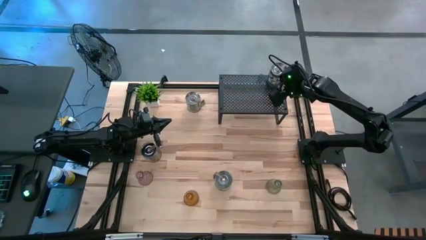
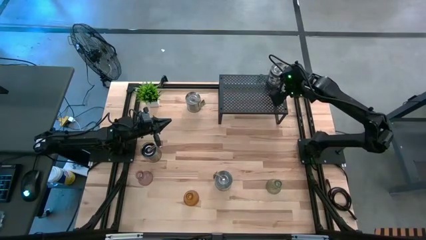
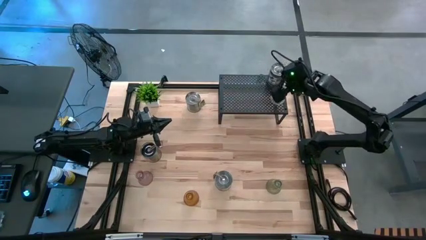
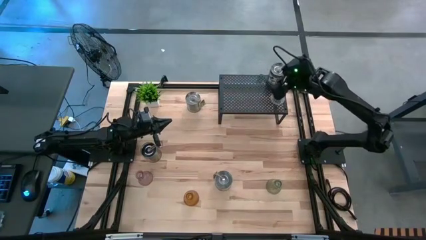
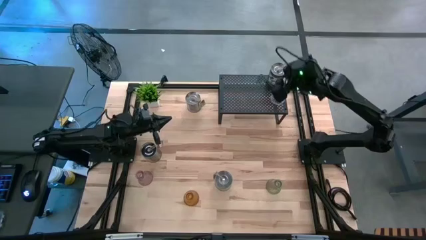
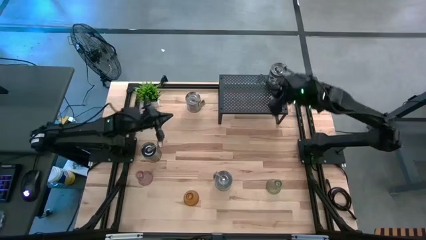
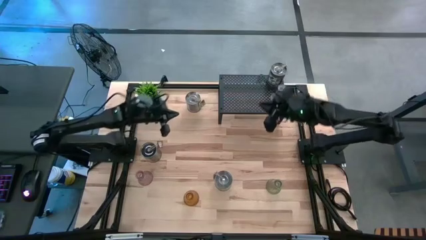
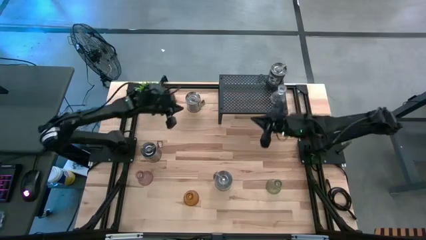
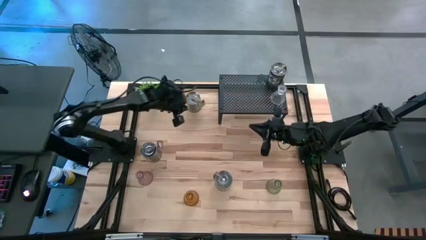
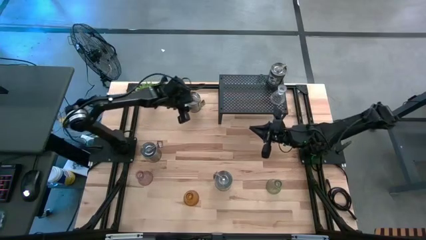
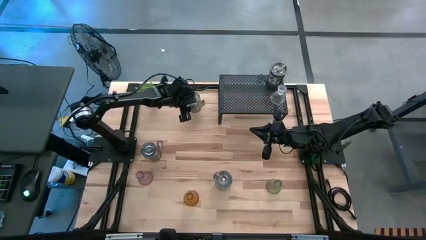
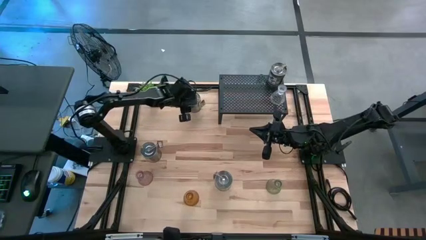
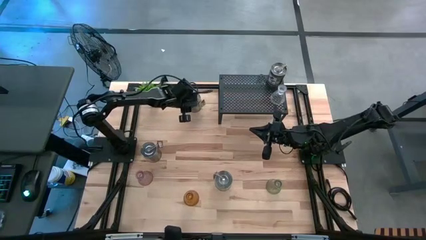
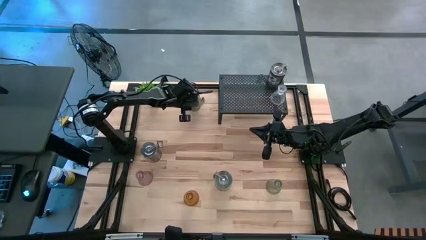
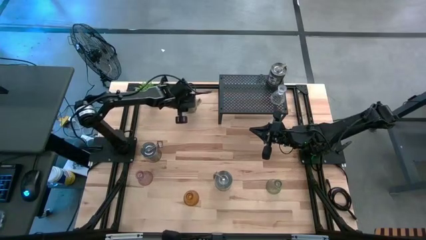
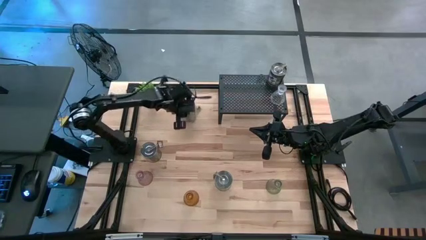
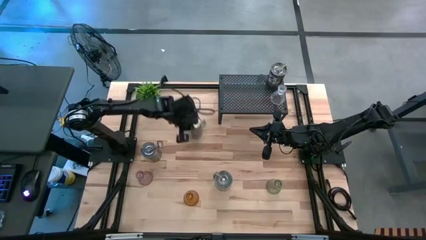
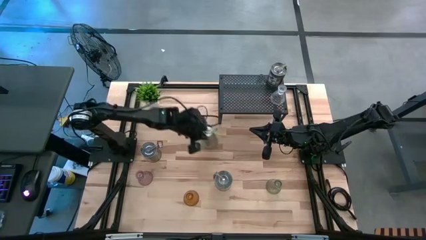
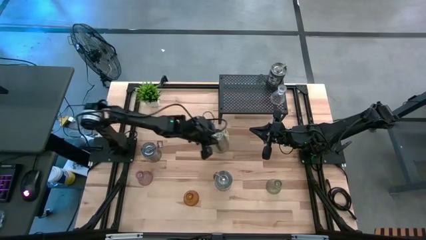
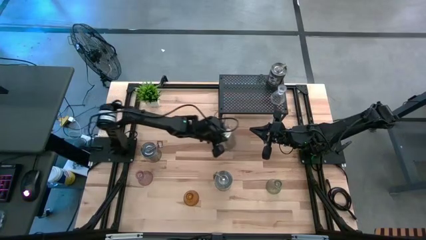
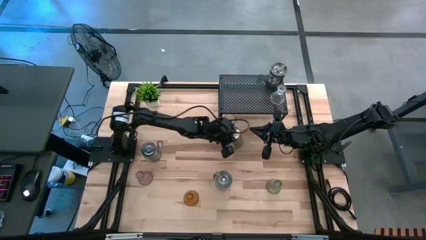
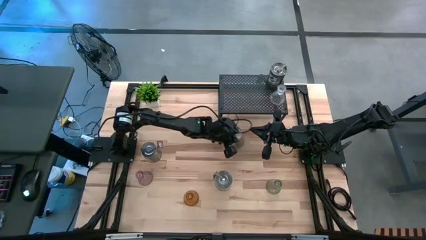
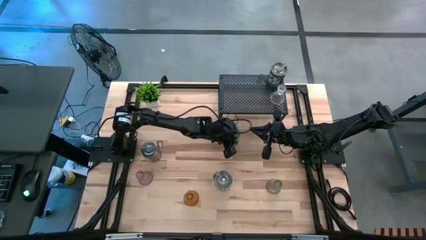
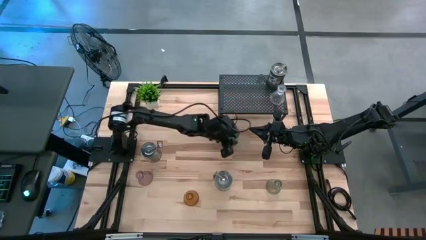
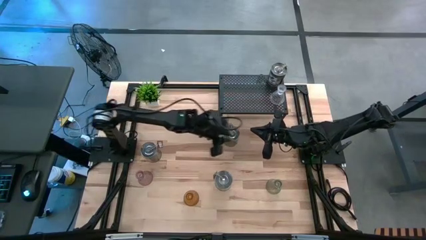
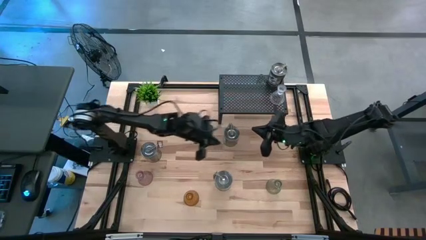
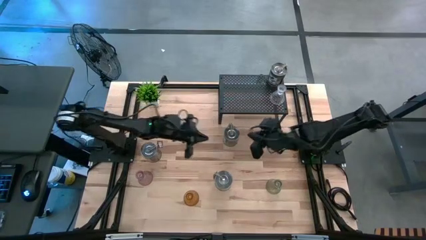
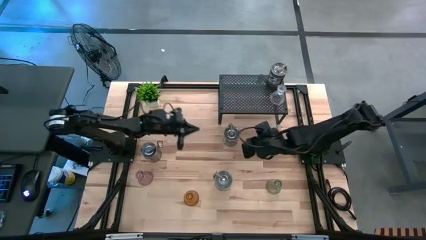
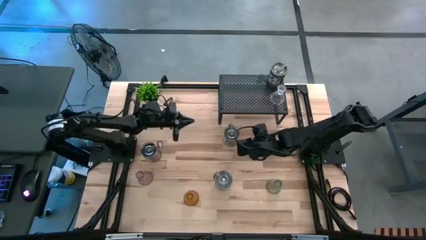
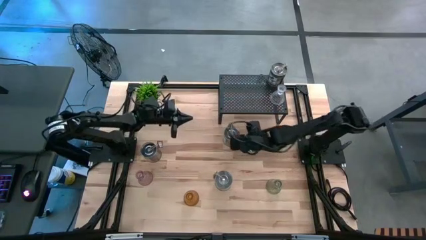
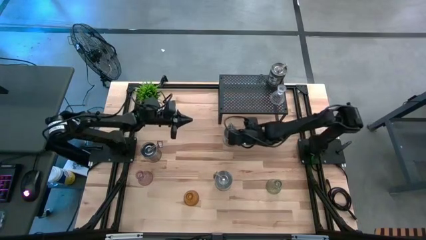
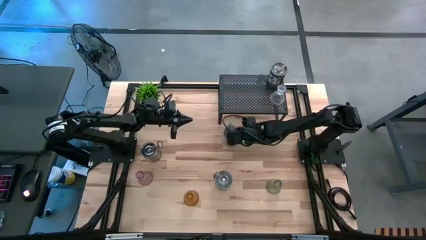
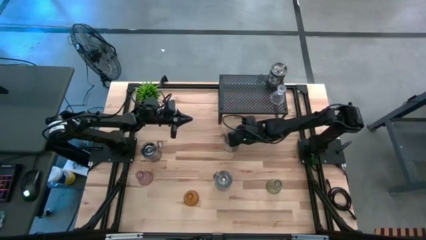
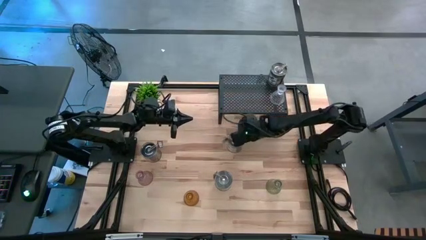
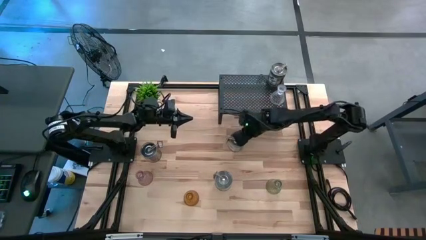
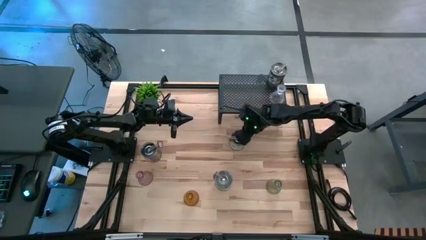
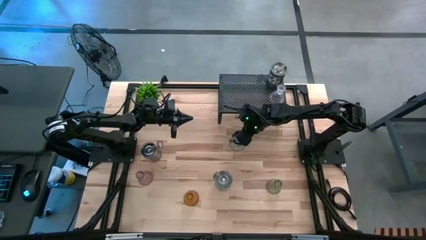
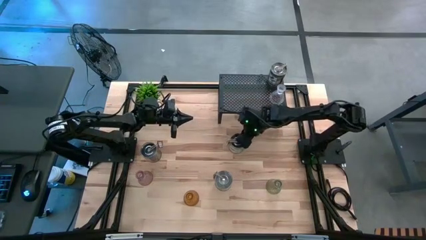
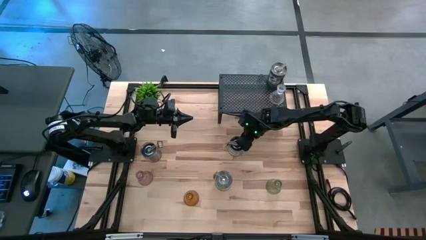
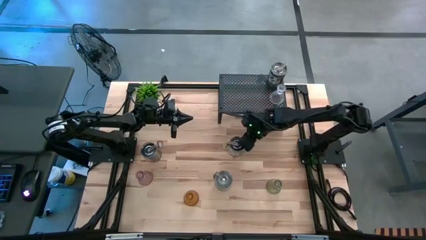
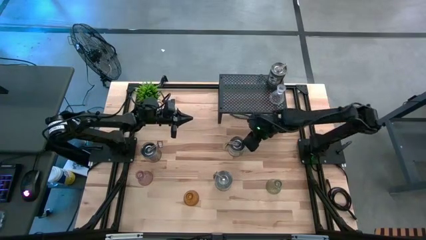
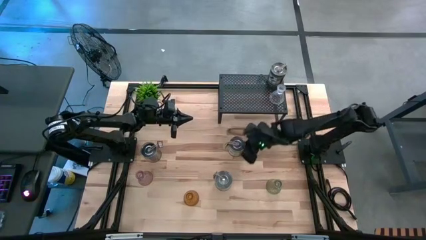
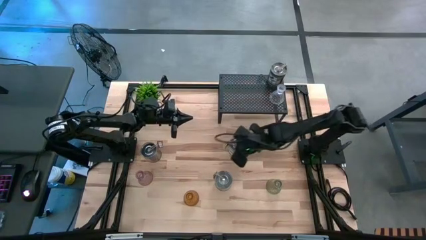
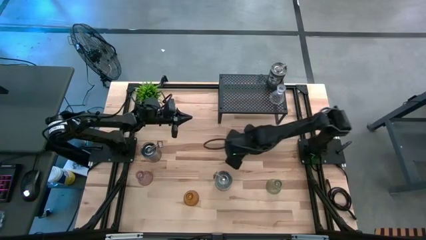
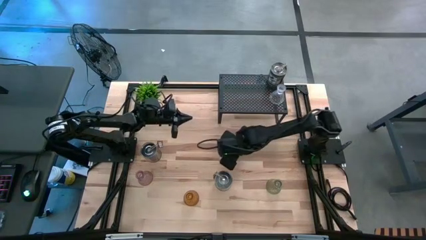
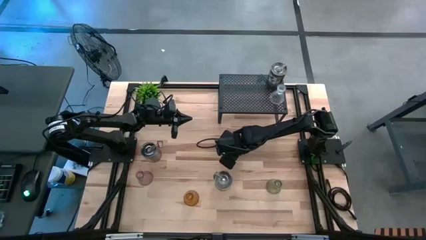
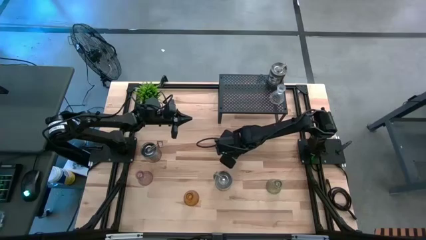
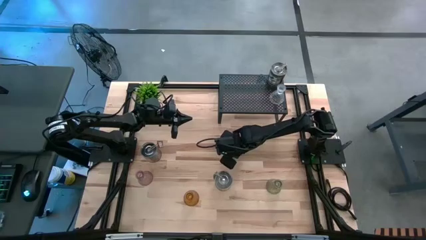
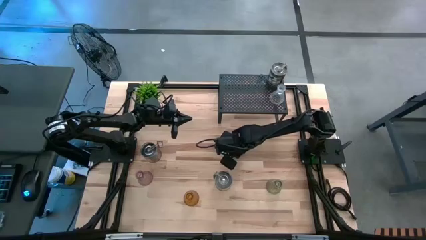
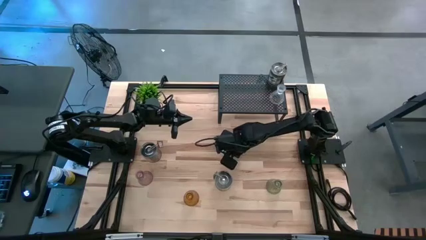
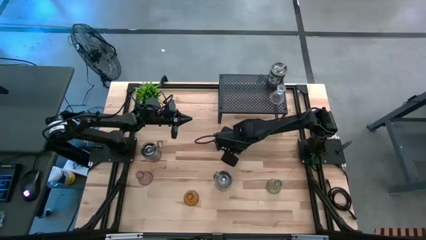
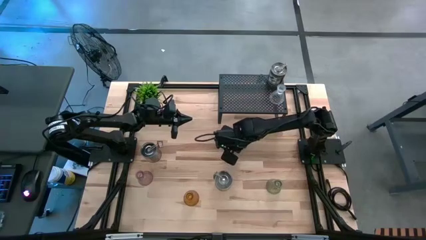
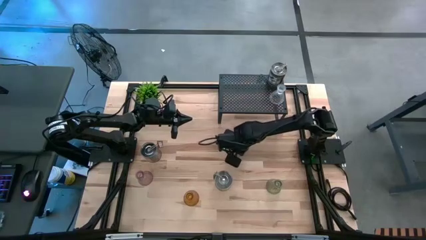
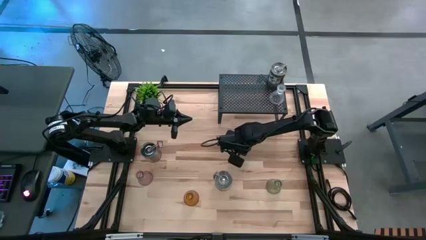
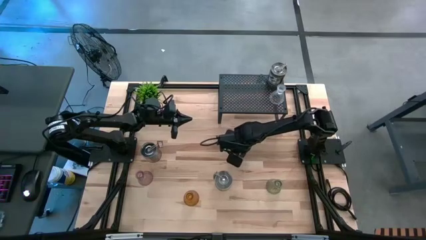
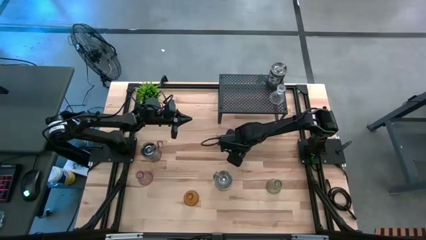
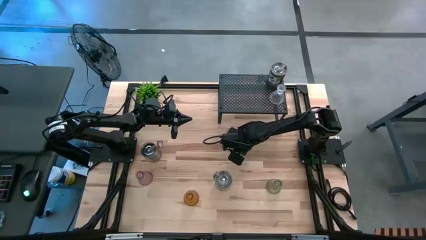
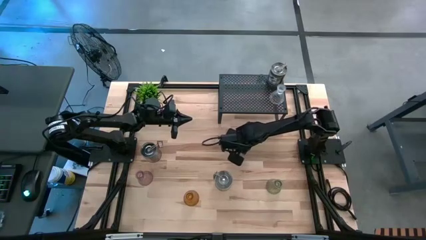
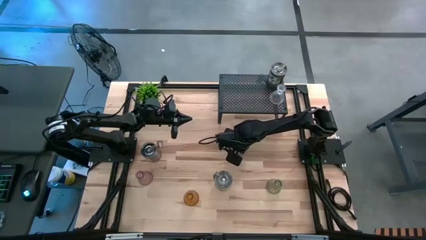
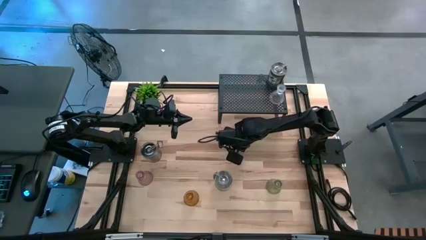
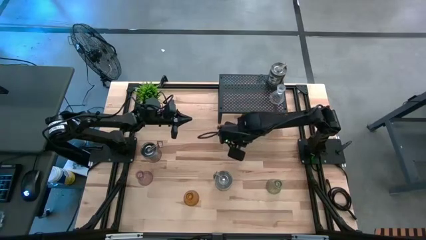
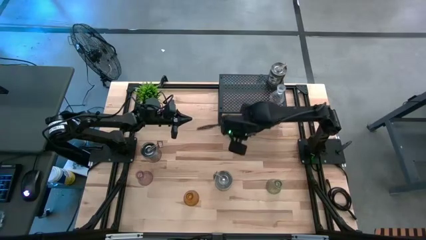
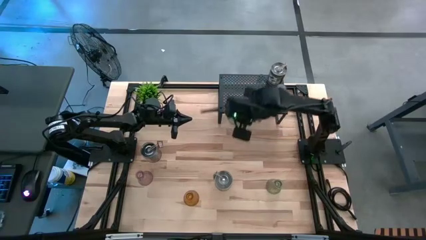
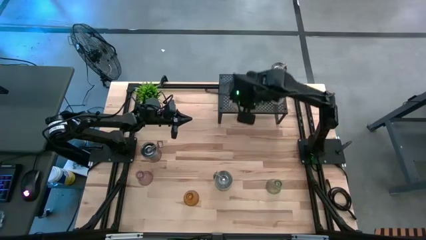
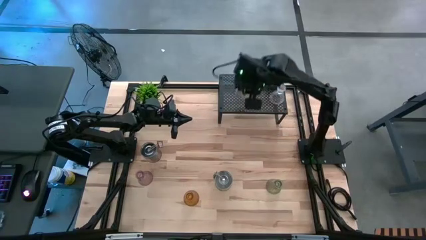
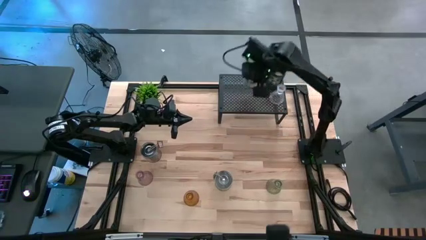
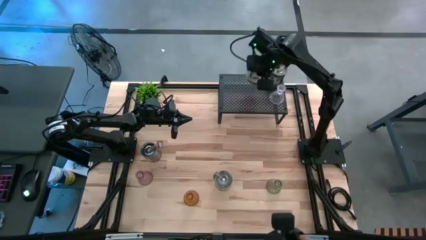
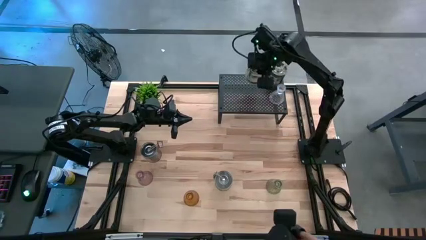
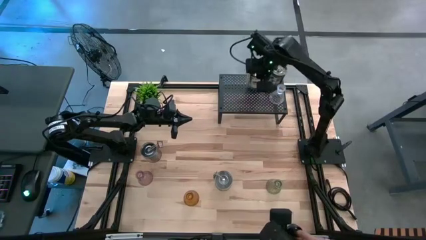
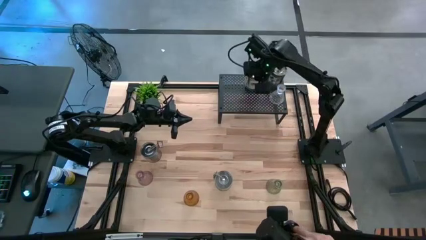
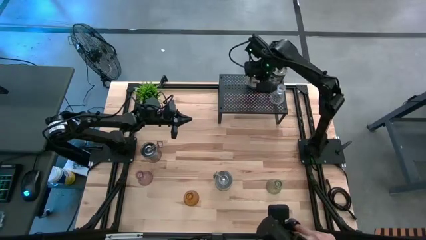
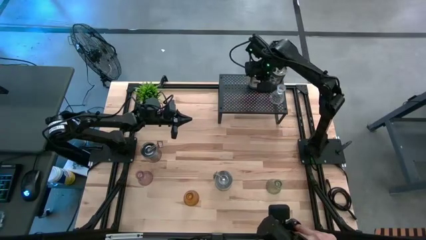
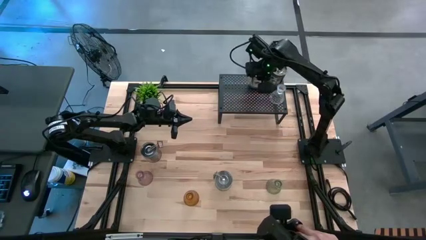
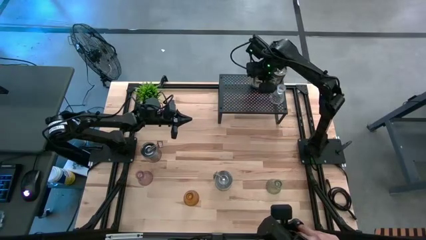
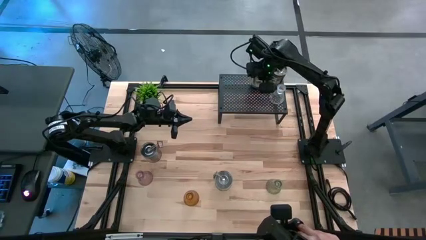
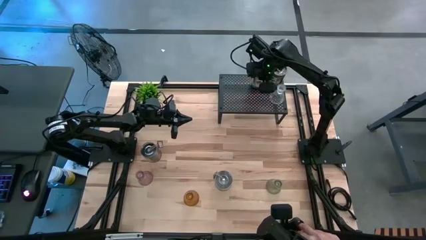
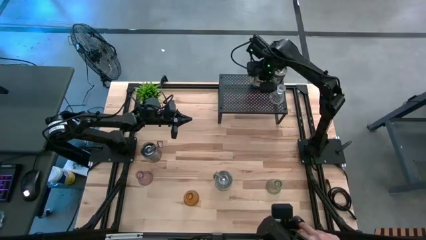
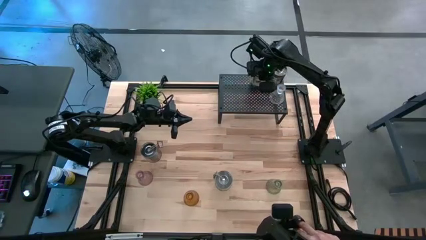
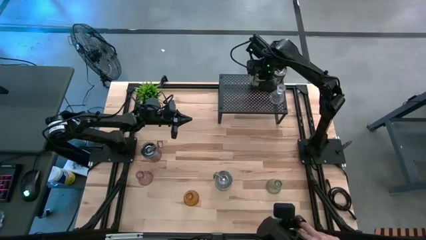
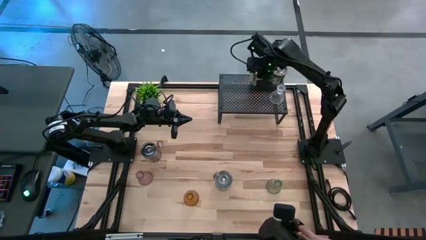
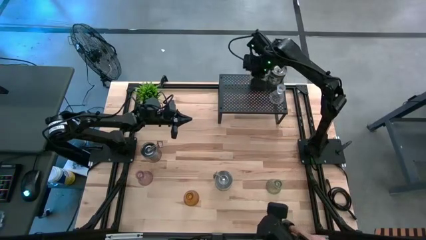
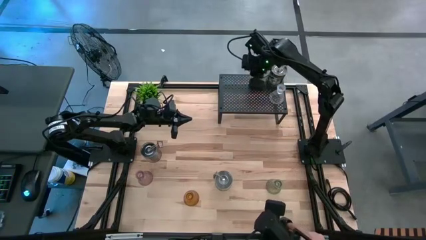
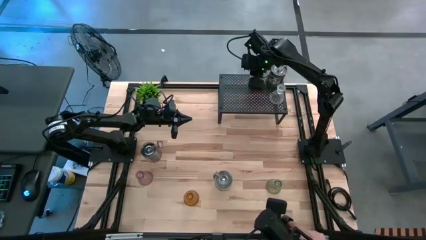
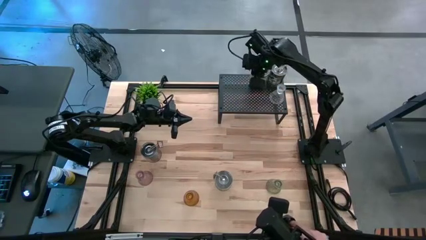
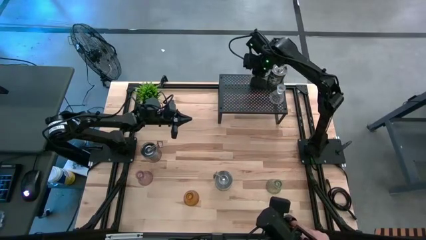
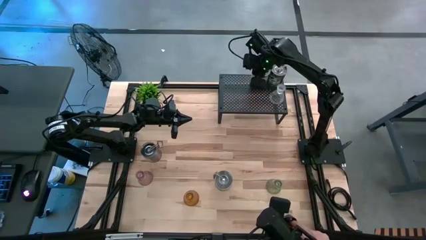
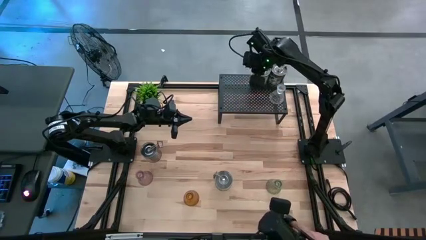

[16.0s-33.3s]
Task: Pick & Place candle stick holders
Align the silver scented candle with the other silver scented candle on the shelf
